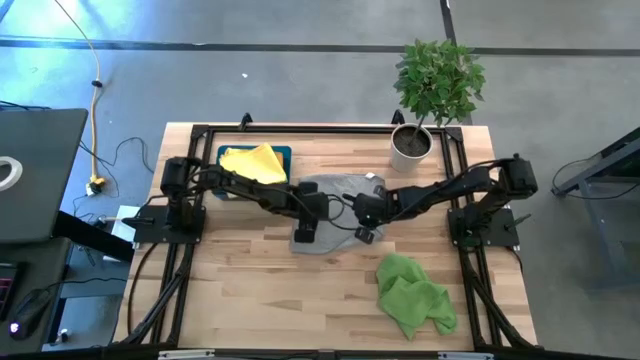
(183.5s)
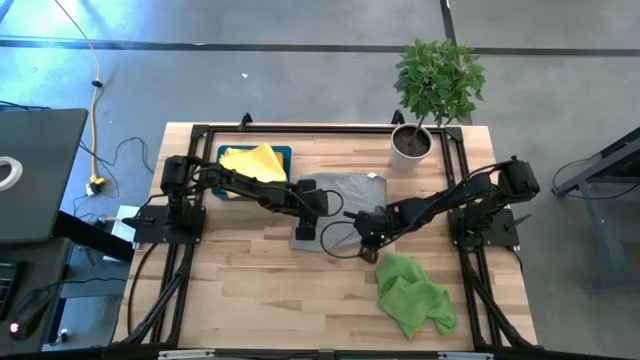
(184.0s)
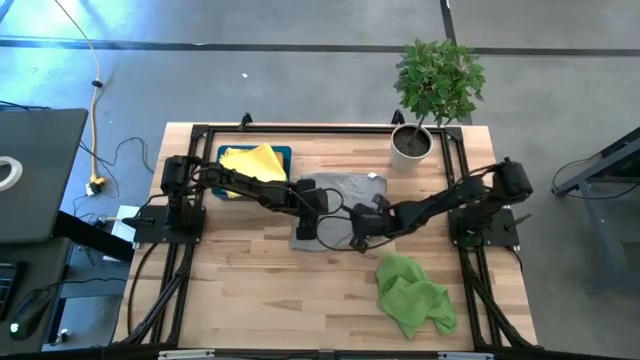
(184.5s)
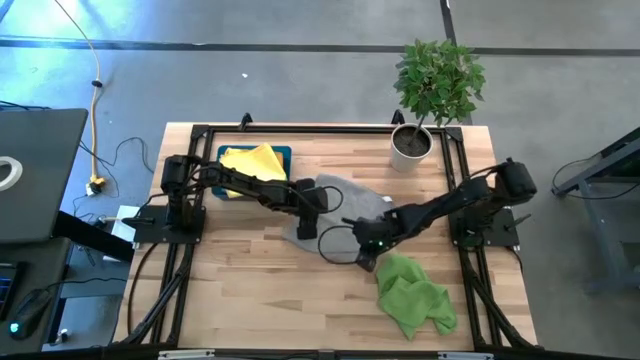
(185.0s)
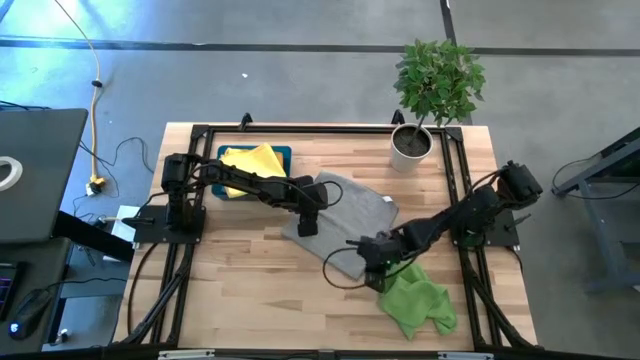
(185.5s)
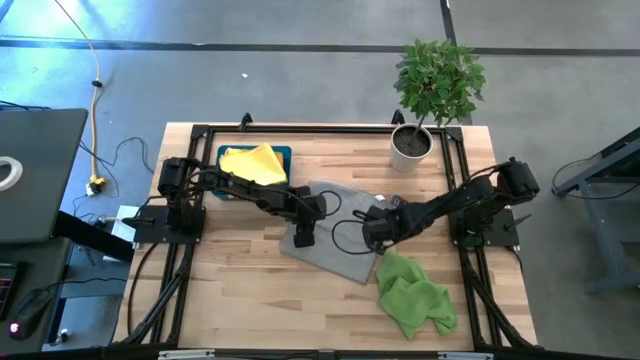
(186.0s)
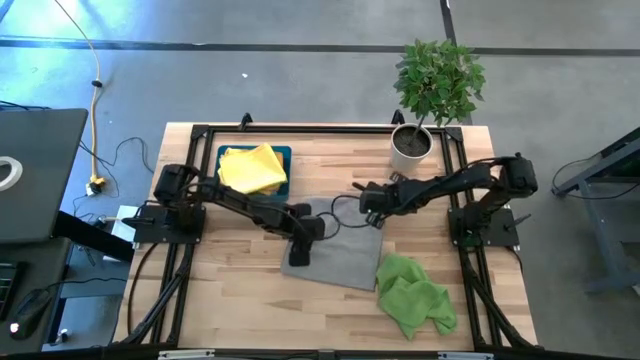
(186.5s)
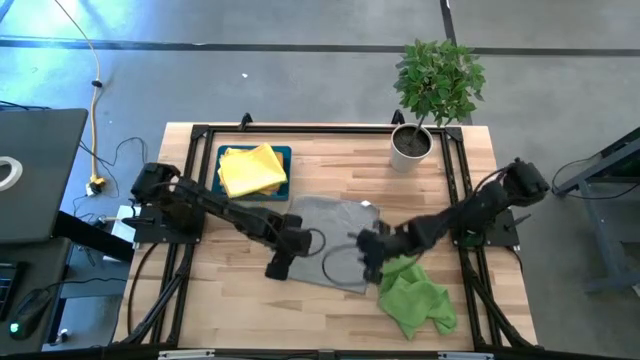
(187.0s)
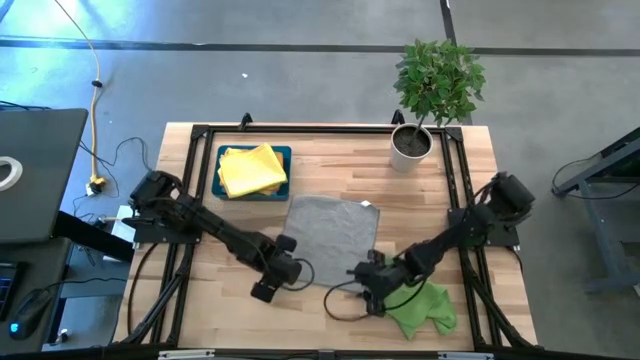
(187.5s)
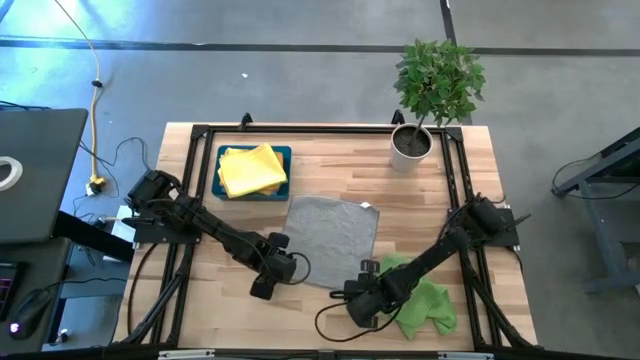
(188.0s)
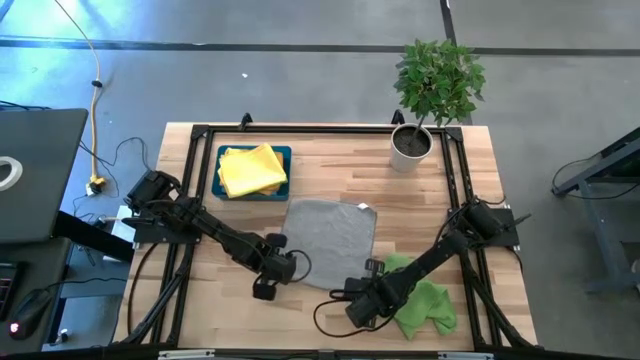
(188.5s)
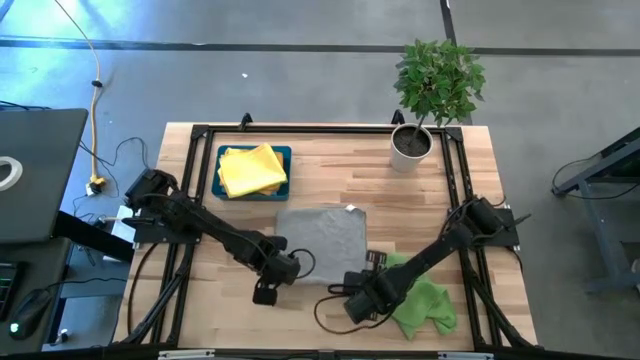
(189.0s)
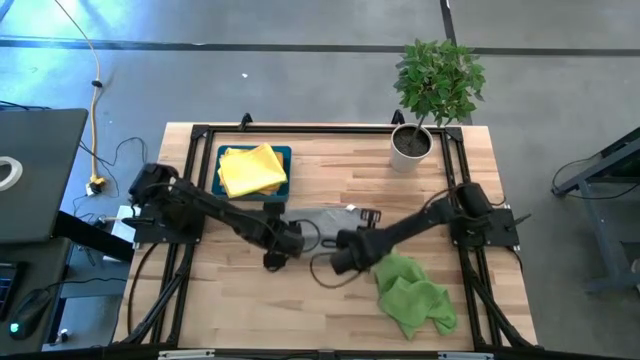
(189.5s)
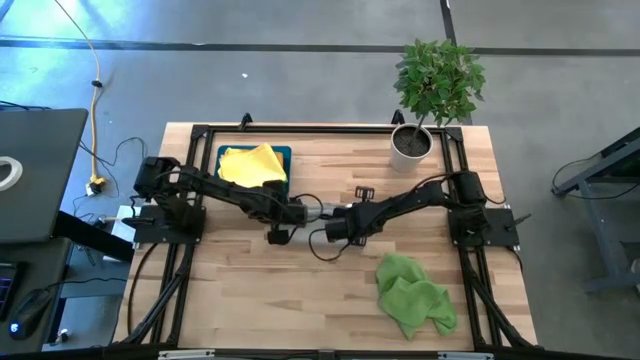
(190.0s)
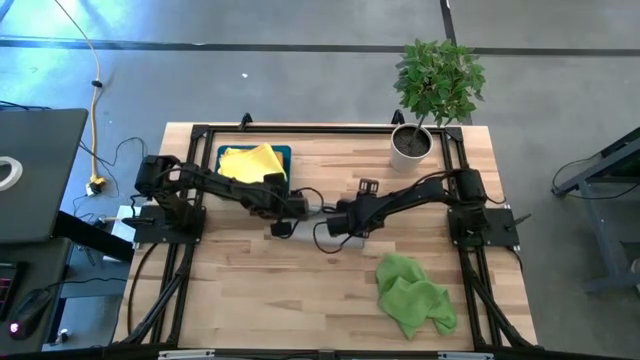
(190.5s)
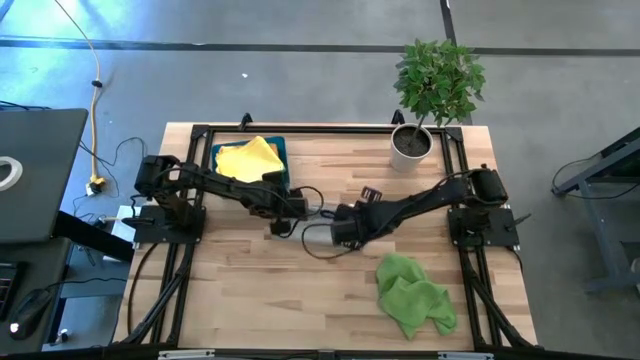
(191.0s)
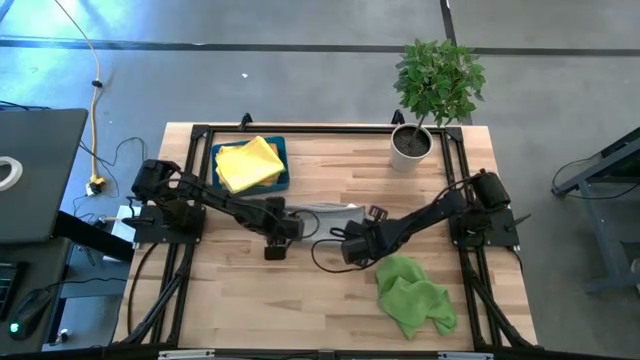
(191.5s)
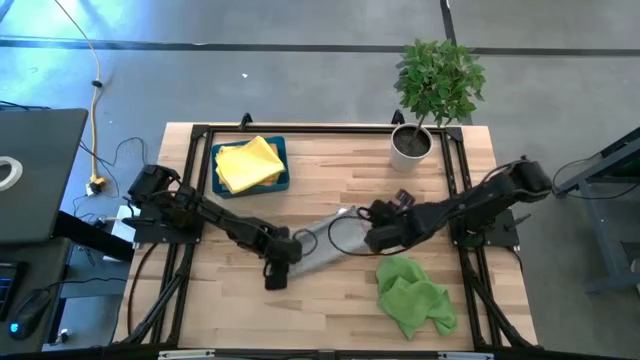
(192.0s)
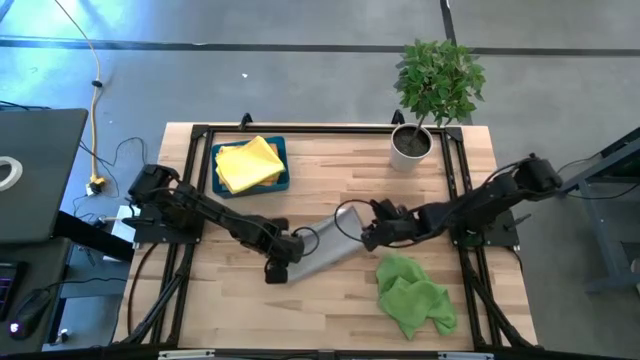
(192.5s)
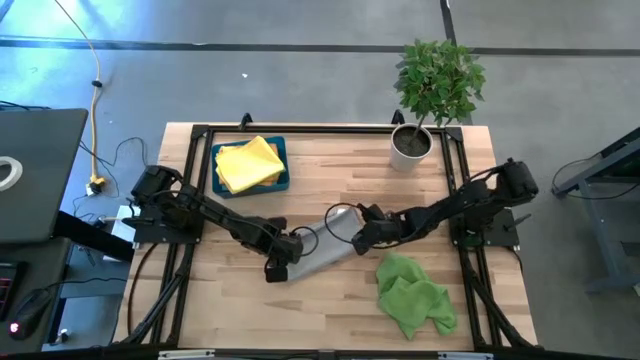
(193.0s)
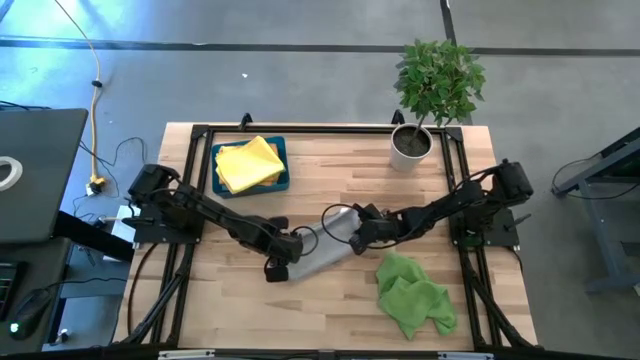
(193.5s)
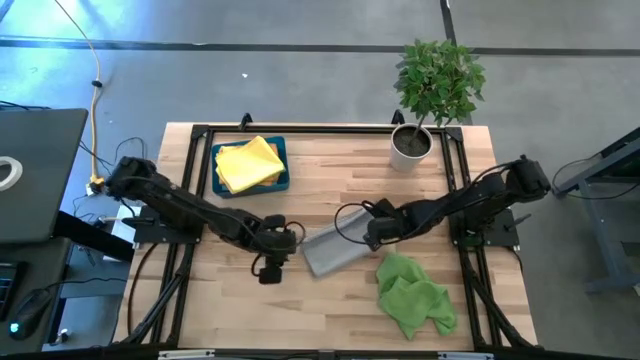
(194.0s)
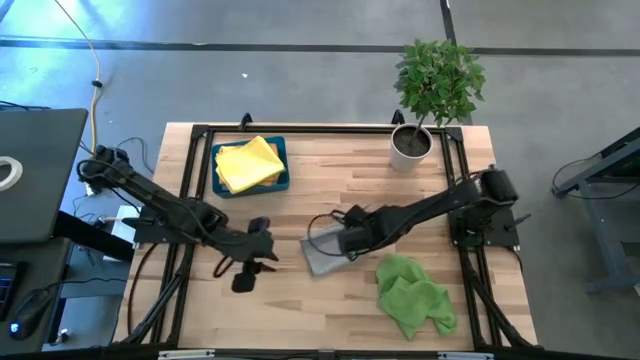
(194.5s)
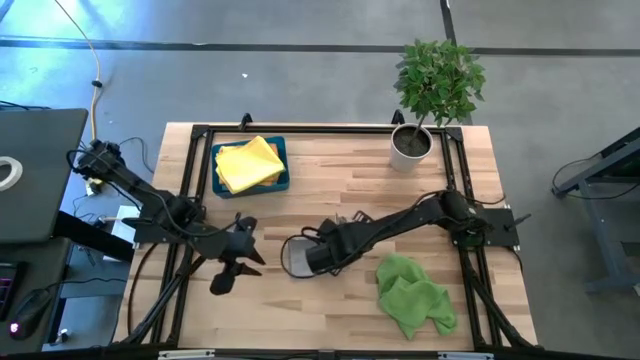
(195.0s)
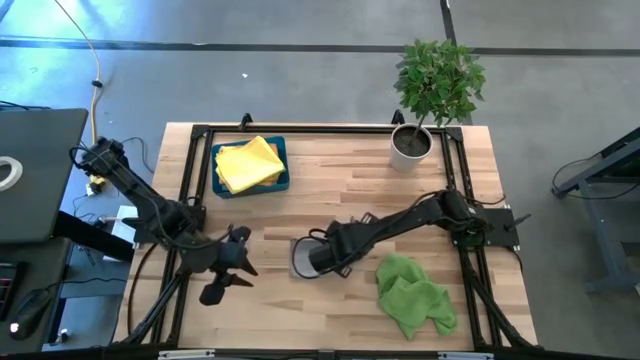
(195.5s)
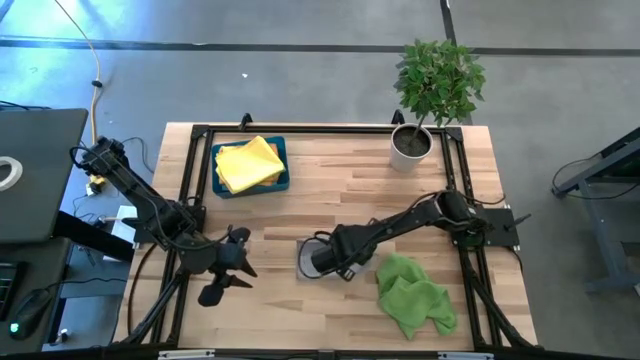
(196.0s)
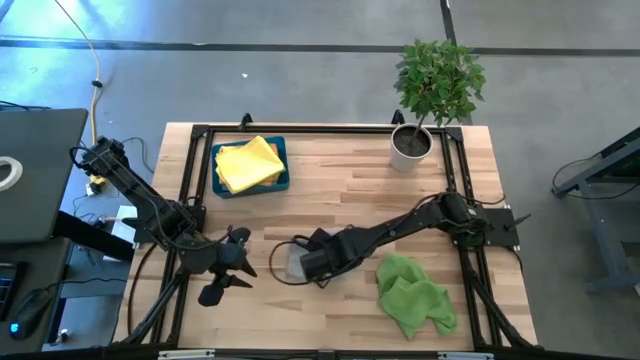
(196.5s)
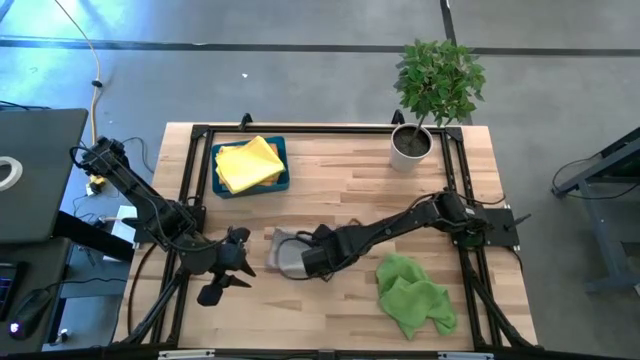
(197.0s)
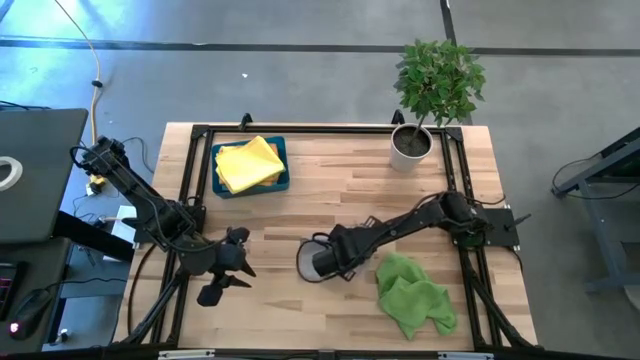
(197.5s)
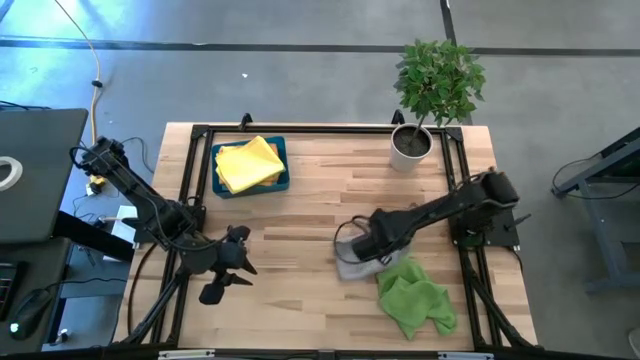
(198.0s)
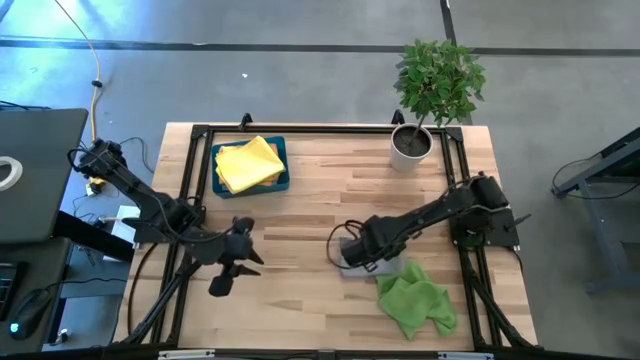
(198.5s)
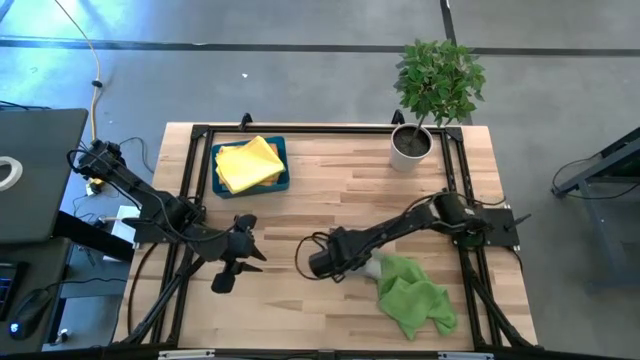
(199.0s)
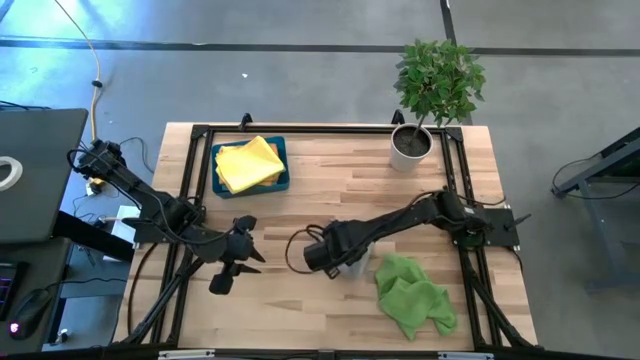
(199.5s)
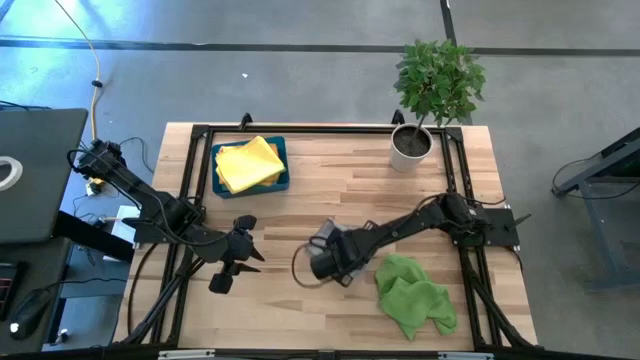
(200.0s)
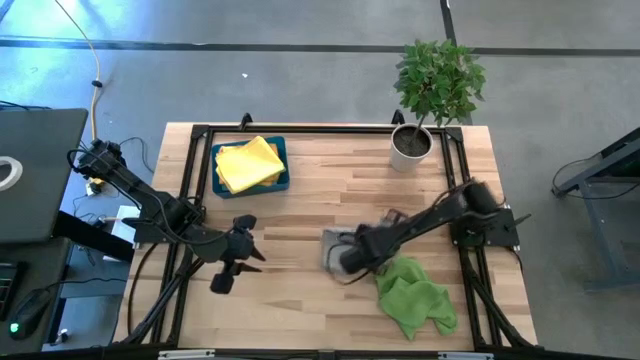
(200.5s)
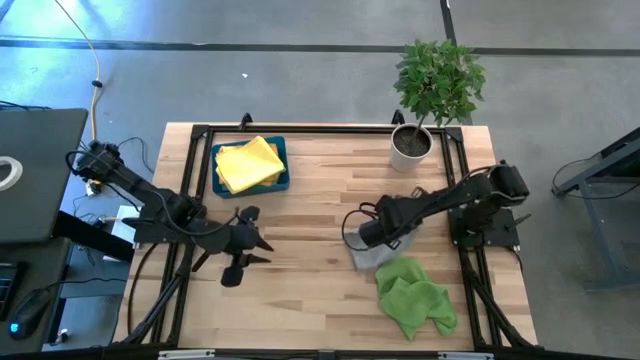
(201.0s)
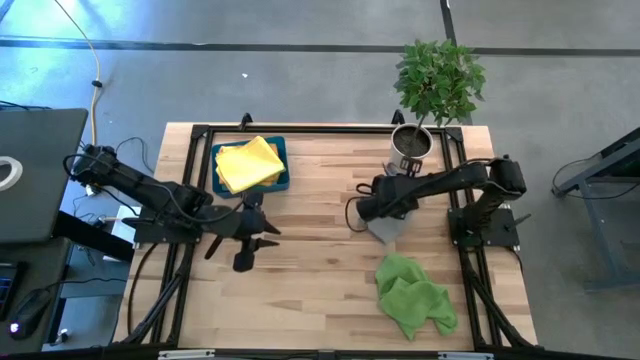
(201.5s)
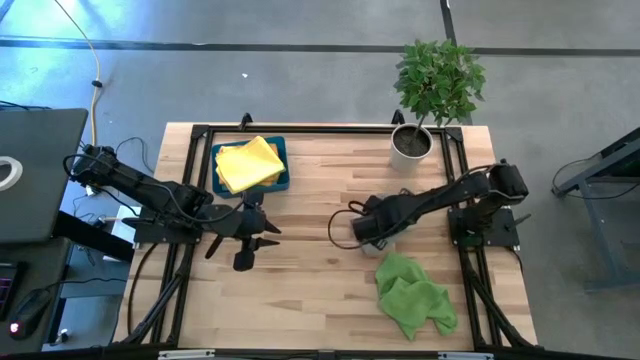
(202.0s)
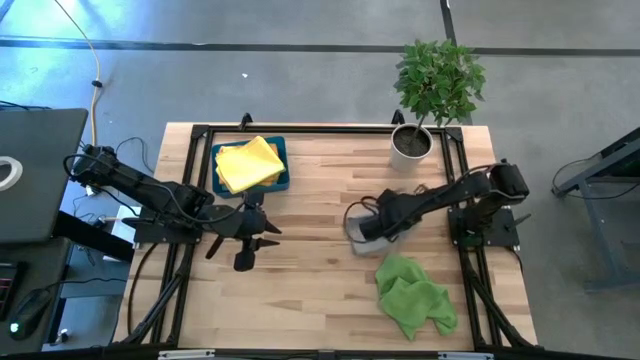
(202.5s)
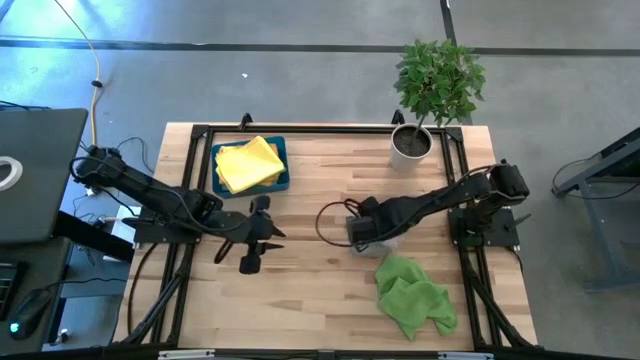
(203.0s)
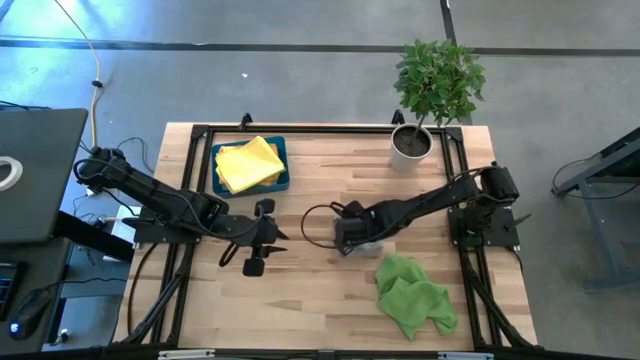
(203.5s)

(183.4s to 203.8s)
Task: Fold microfiber towels
Fold the gray microfiber cloth
